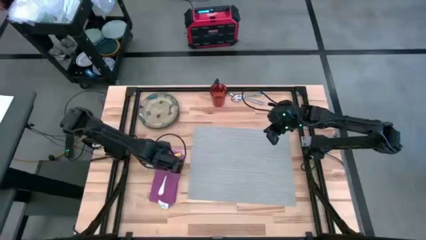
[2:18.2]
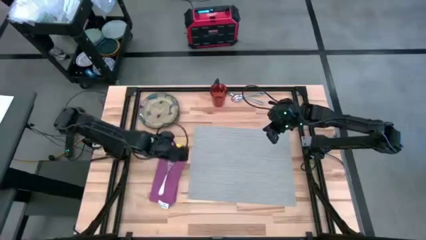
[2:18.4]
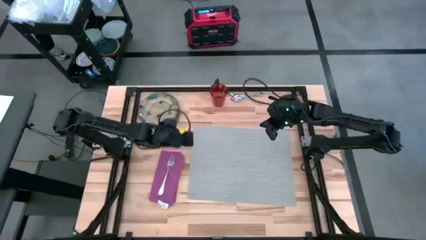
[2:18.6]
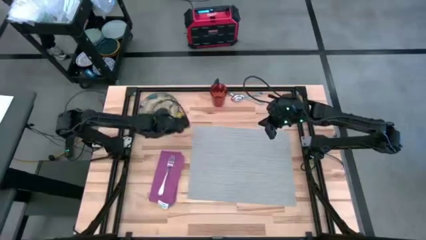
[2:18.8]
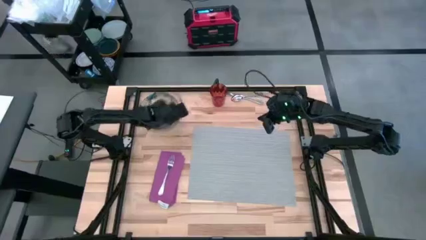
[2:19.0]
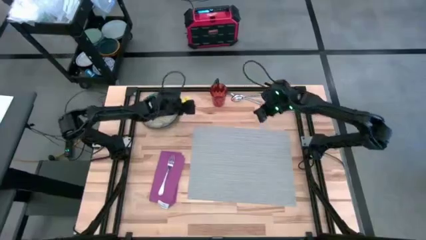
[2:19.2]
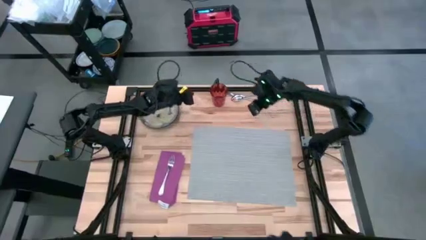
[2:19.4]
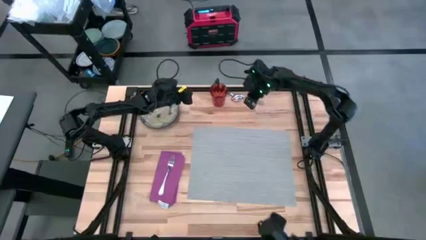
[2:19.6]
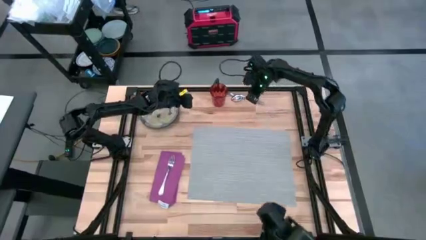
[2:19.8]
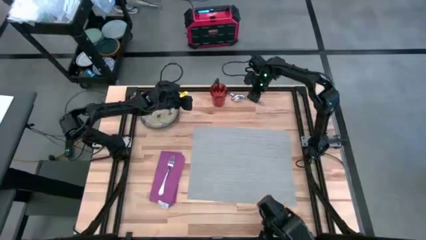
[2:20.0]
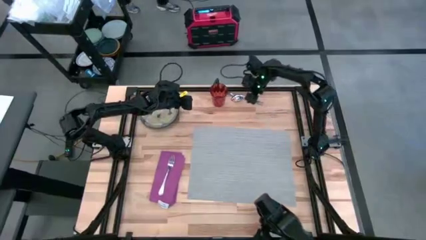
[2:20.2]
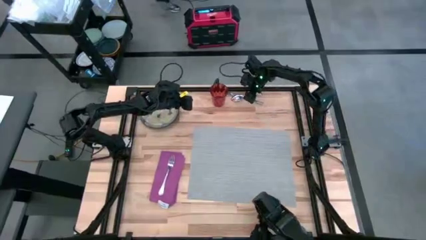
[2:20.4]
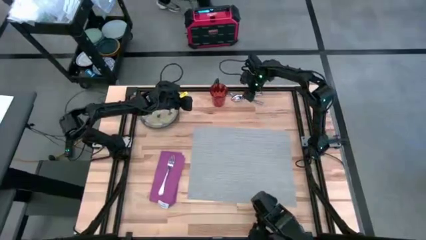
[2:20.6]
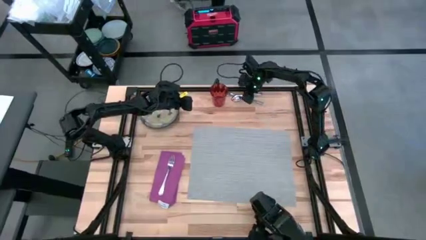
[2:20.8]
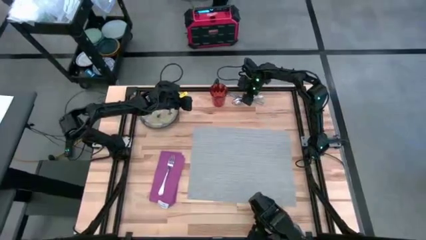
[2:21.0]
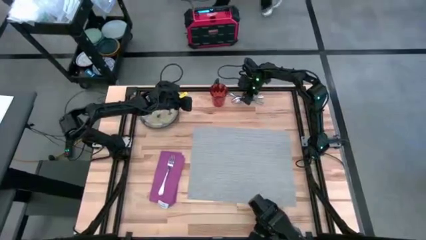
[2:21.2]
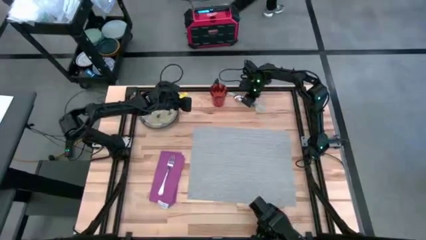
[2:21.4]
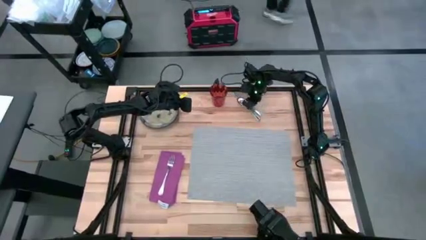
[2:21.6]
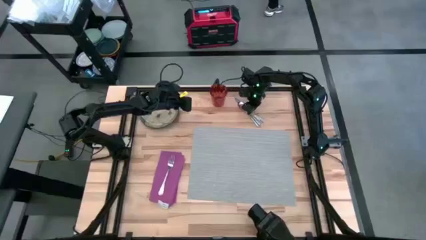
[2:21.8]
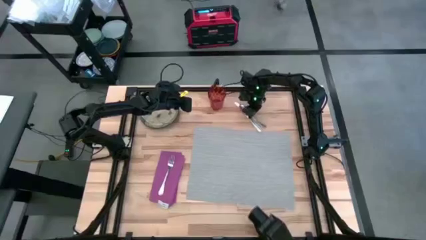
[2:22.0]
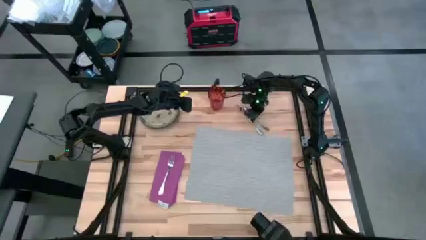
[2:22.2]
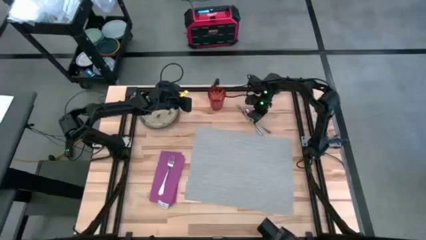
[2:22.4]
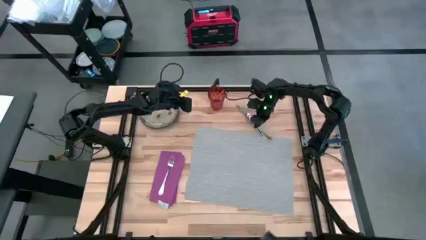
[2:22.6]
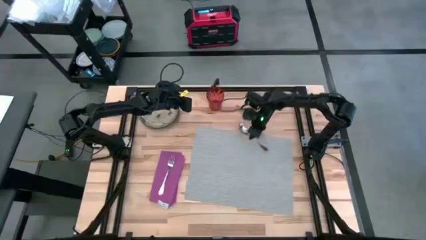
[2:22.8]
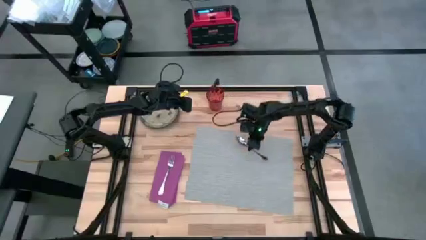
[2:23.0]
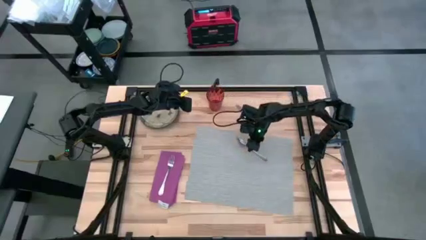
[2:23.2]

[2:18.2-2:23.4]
Task: Set table place
Put the spoon on top of the table mat

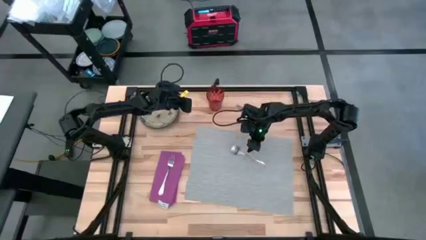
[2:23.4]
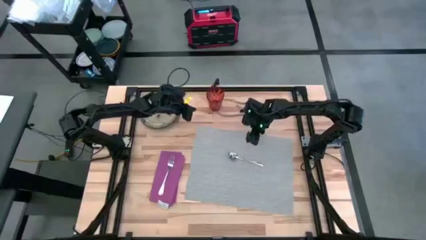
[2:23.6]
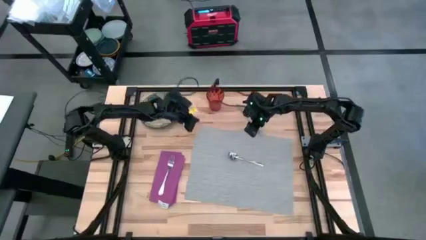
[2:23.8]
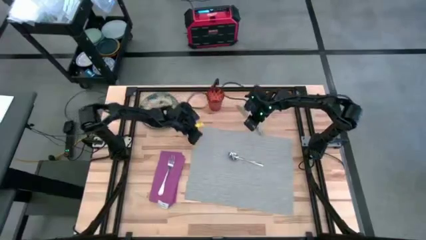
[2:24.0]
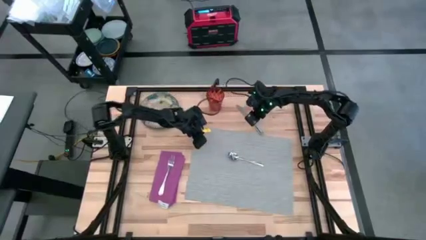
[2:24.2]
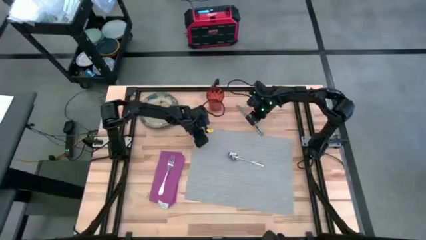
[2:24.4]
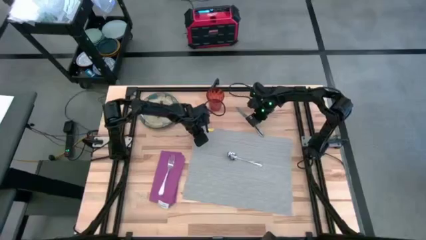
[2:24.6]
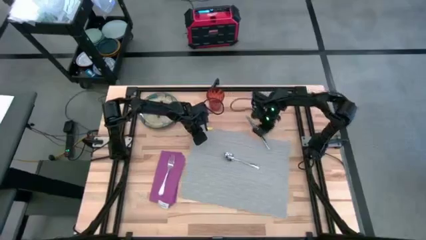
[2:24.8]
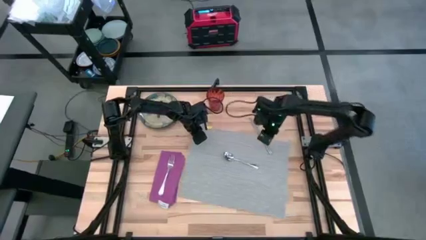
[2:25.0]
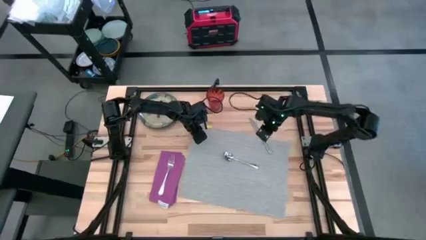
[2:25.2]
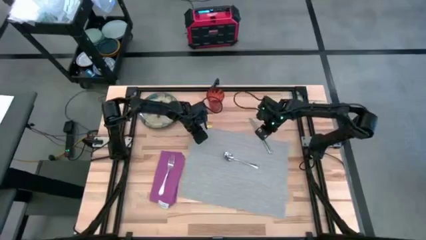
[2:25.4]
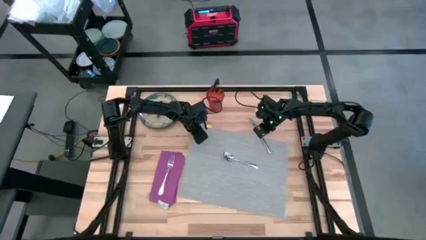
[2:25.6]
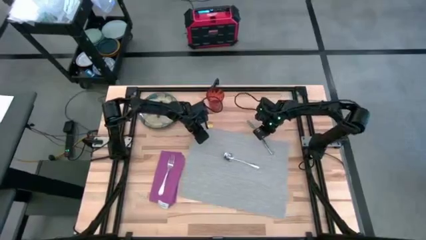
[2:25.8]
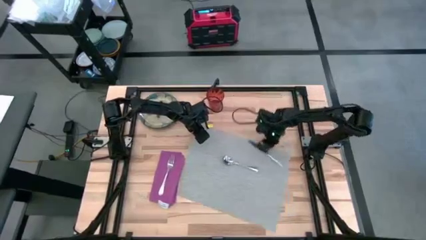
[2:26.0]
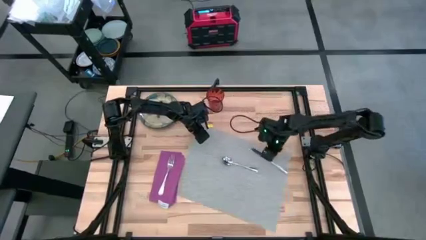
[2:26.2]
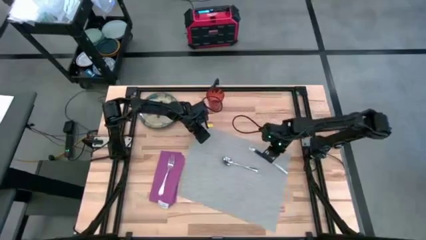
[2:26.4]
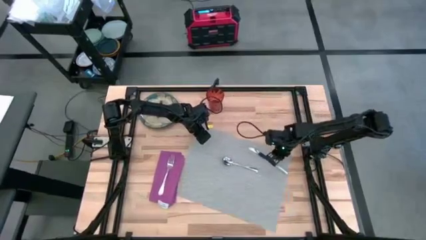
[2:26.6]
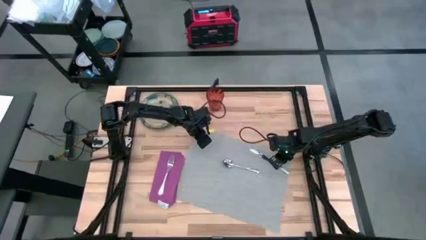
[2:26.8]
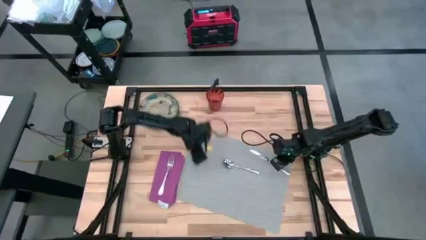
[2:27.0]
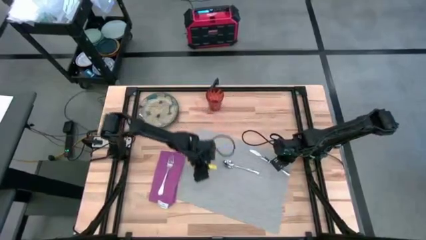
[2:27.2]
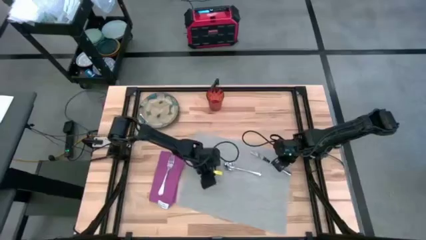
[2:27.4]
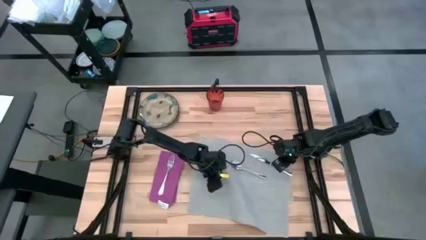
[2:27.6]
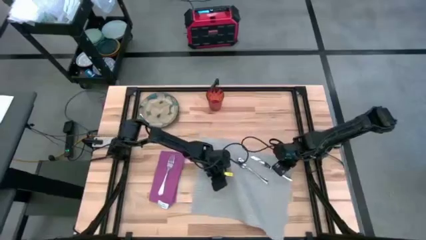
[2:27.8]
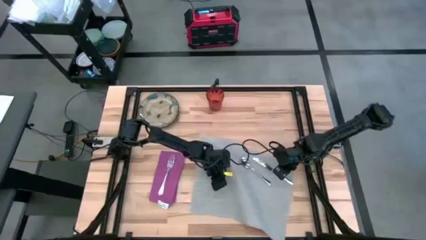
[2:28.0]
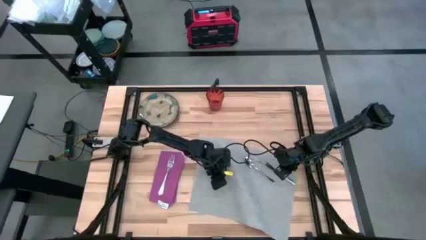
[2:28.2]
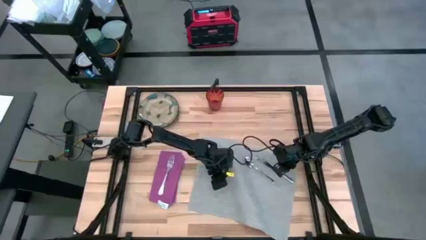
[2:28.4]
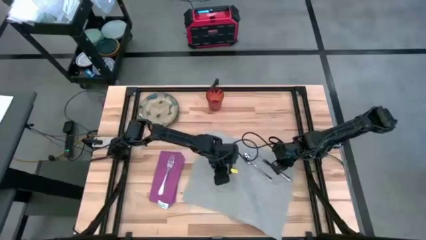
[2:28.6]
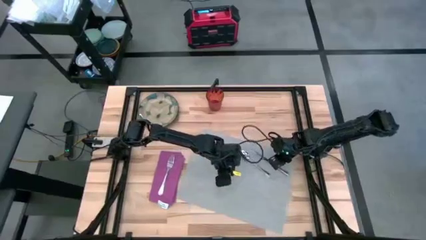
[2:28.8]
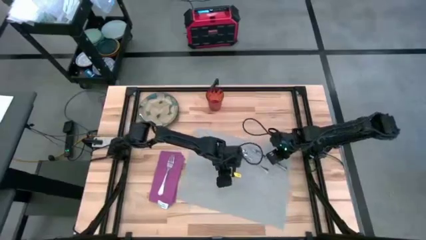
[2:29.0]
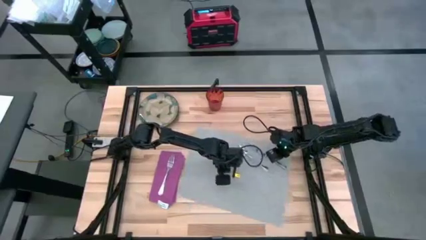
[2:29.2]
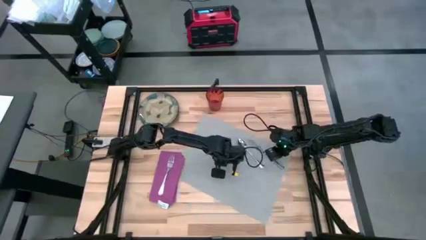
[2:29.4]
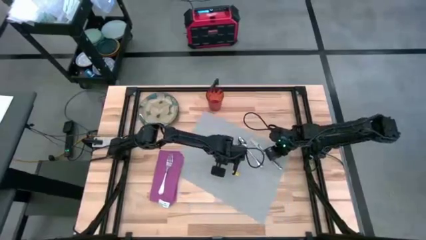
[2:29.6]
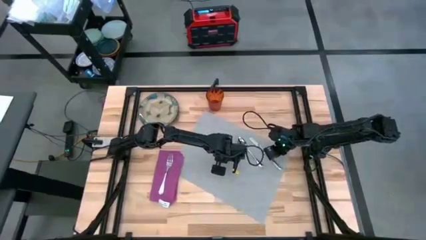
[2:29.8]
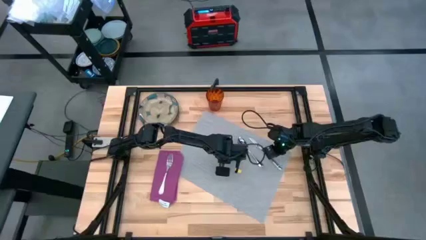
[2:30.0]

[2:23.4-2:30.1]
Move the knife on top of the table mat

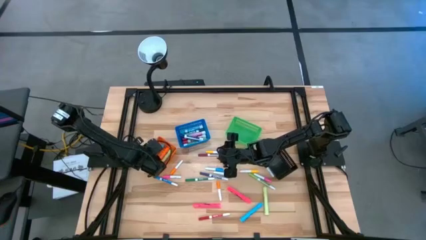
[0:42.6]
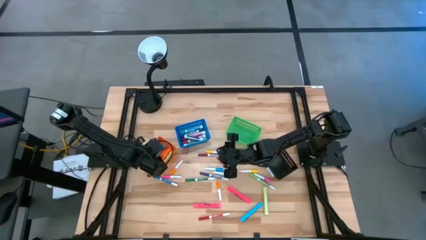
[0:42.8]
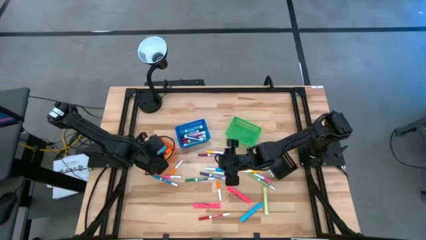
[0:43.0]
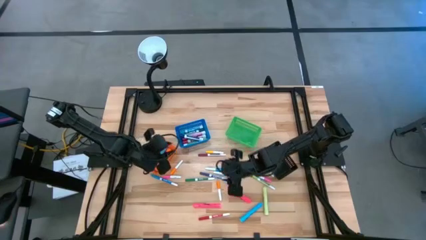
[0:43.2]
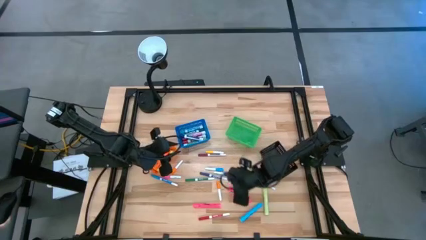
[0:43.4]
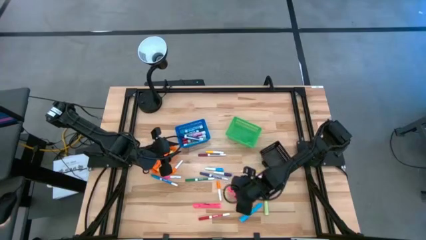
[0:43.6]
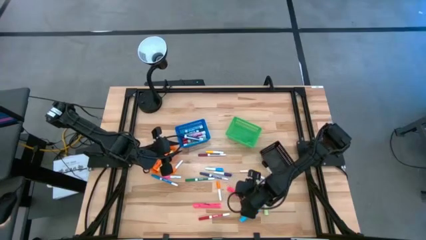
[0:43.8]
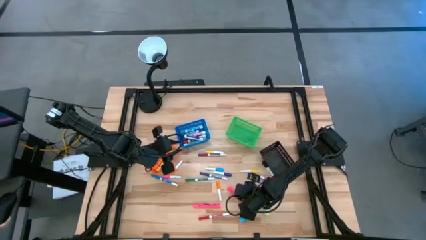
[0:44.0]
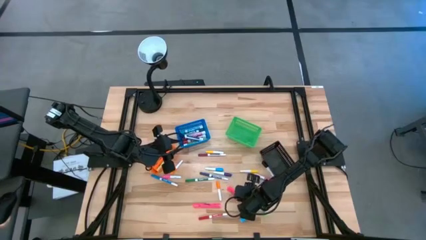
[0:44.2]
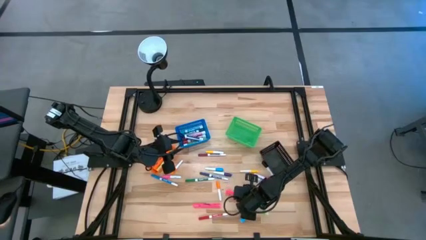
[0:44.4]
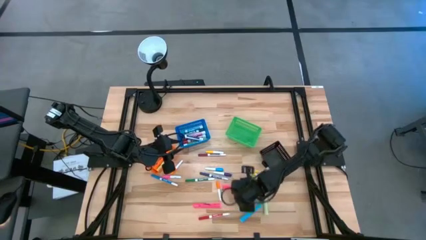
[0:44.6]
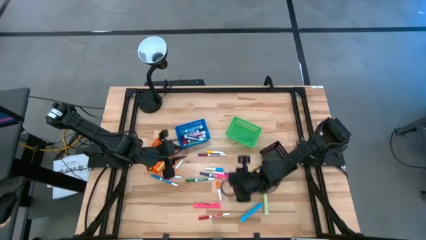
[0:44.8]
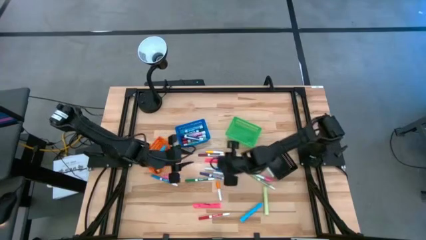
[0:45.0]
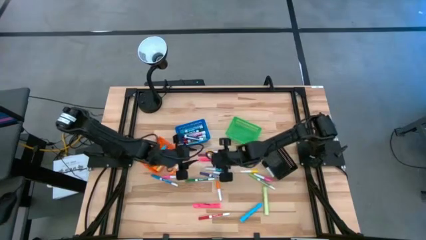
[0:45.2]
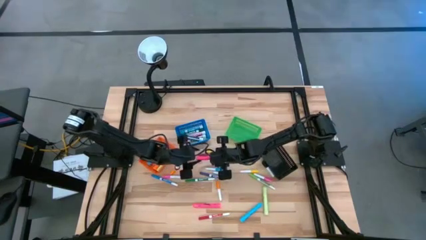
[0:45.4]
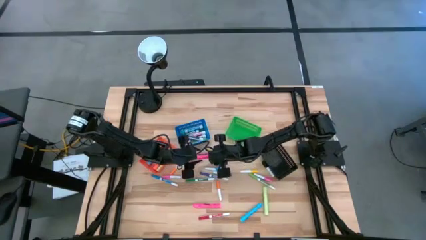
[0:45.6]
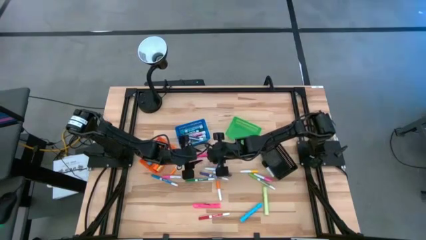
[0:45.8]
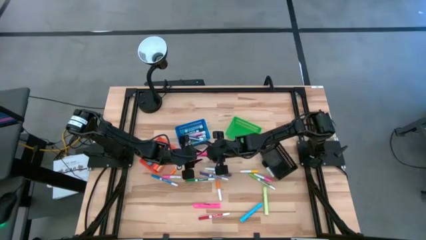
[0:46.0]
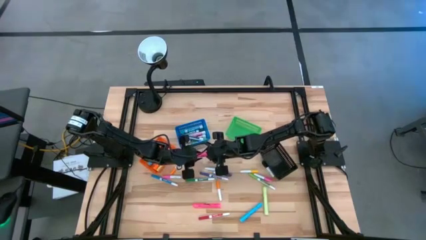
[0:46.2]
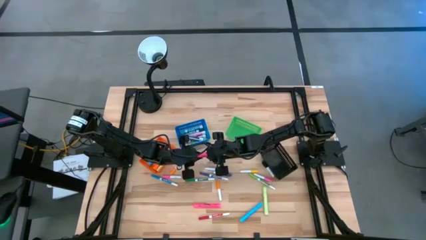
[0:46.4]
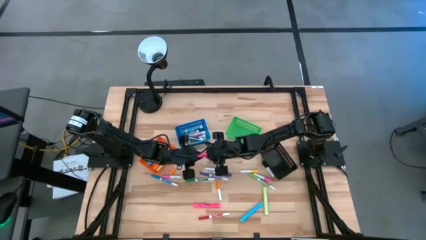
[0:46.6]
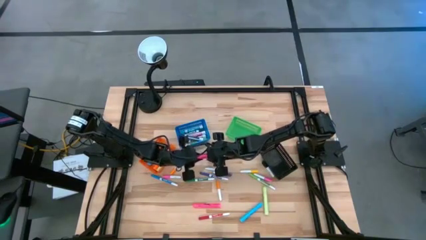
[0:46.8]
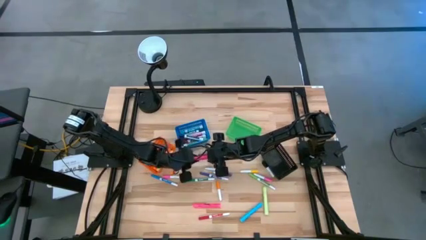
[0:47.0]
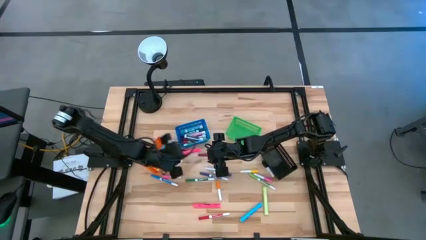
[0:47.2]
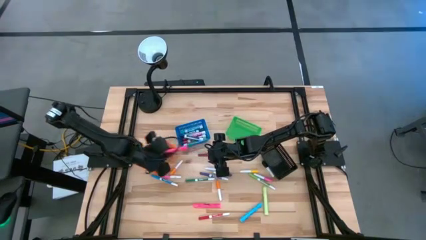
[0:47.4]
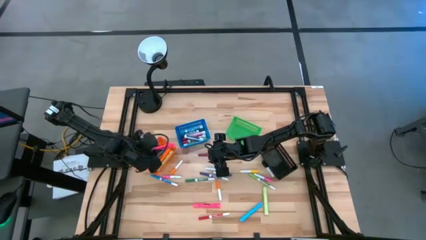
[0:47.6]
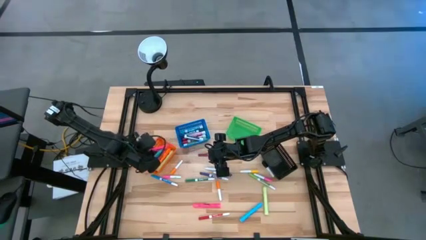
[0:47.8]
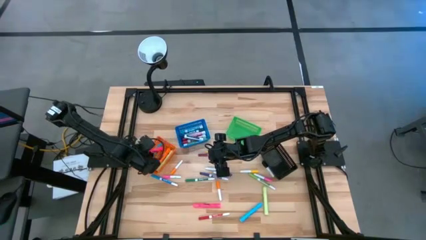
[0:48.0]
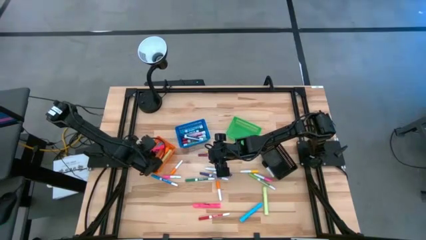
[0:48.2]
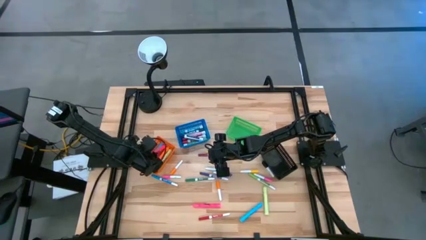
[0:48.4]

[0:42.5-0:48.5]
Task: Pick & Place Markers
Put the middle right pink highlighter pen into the orange basket
